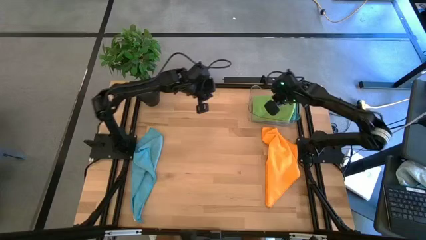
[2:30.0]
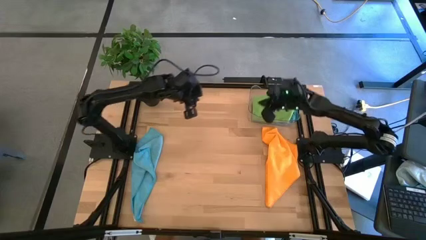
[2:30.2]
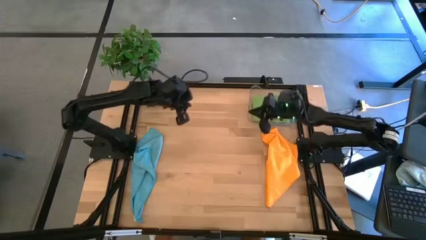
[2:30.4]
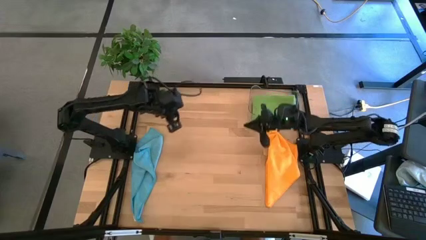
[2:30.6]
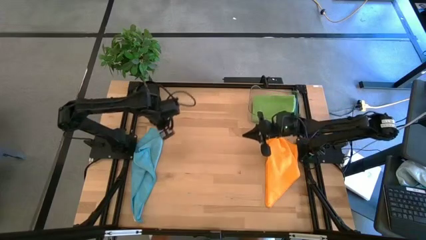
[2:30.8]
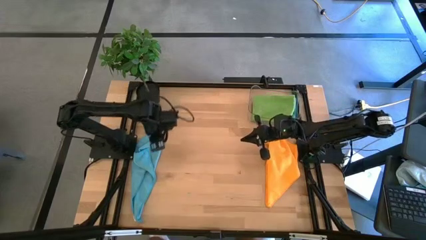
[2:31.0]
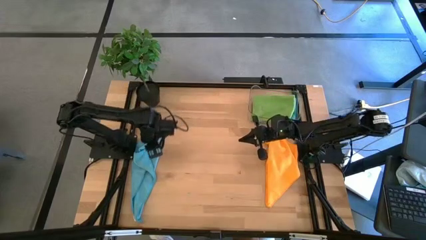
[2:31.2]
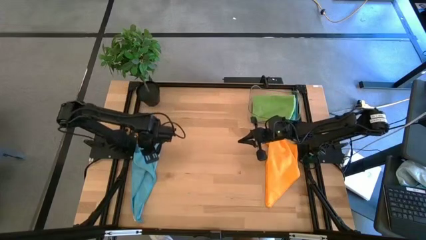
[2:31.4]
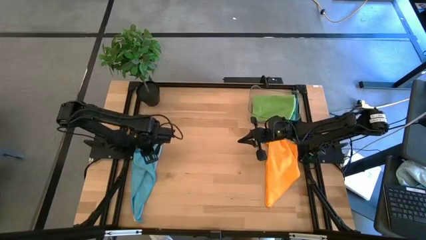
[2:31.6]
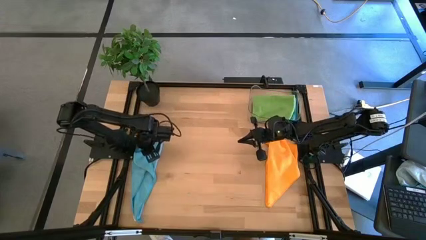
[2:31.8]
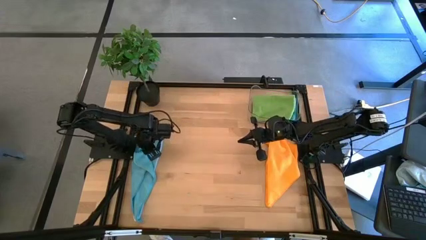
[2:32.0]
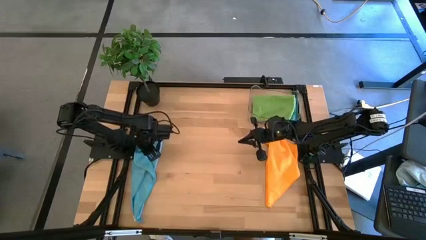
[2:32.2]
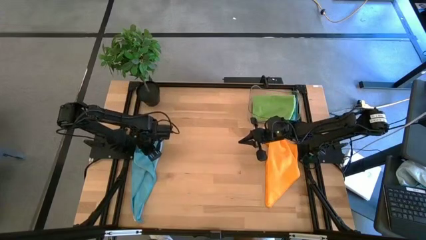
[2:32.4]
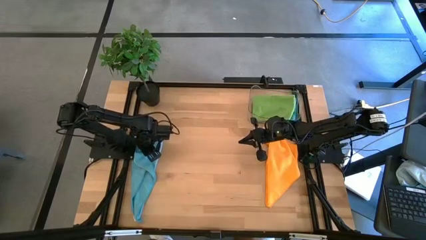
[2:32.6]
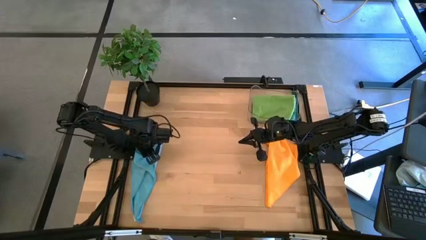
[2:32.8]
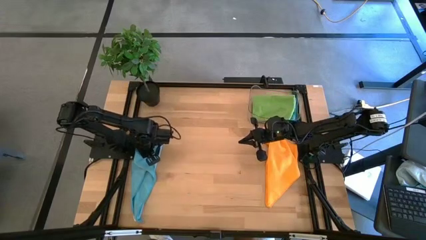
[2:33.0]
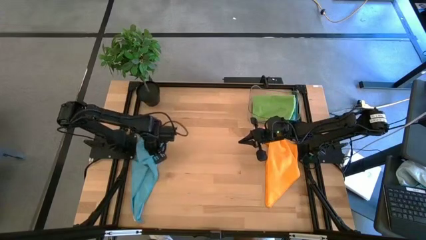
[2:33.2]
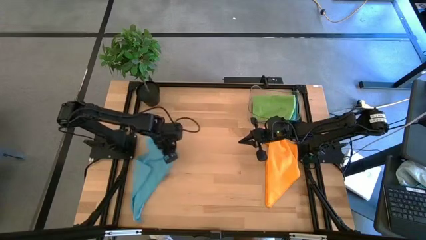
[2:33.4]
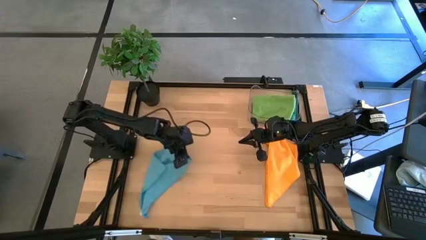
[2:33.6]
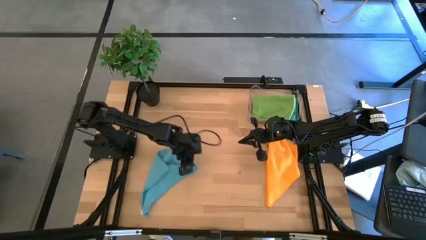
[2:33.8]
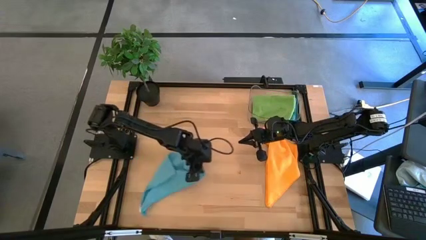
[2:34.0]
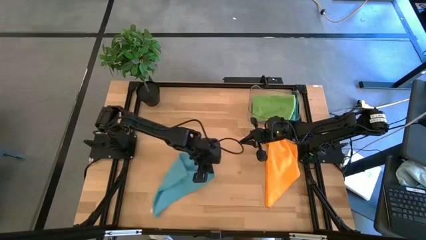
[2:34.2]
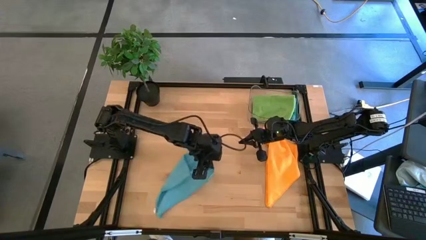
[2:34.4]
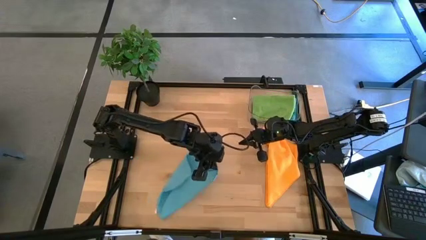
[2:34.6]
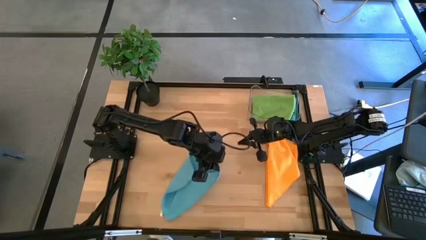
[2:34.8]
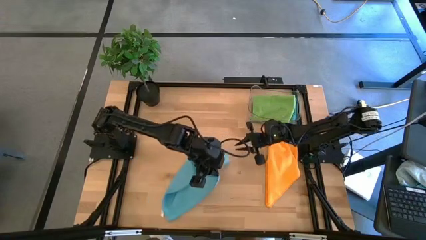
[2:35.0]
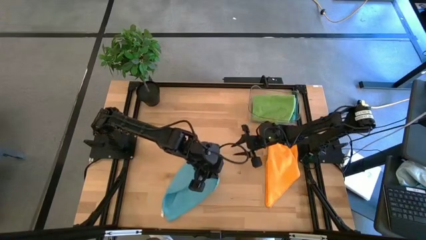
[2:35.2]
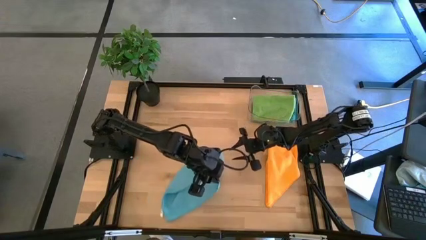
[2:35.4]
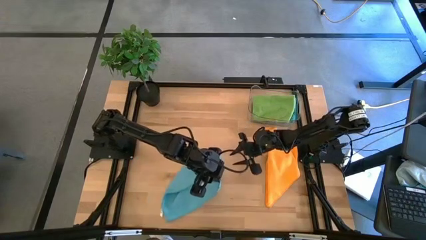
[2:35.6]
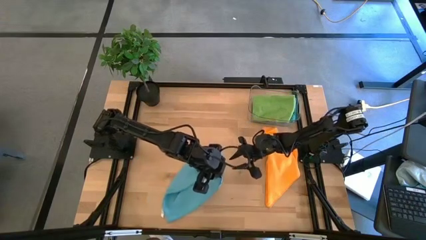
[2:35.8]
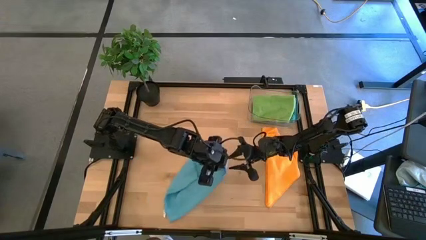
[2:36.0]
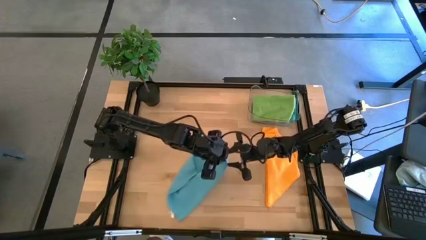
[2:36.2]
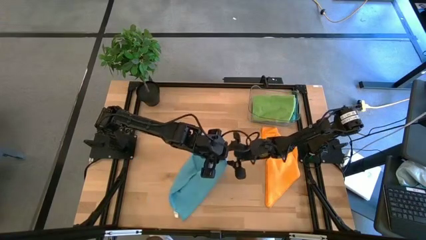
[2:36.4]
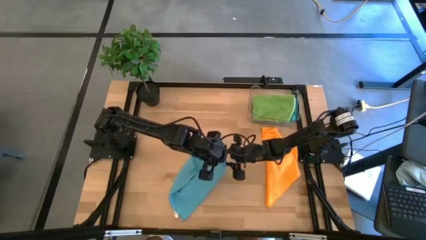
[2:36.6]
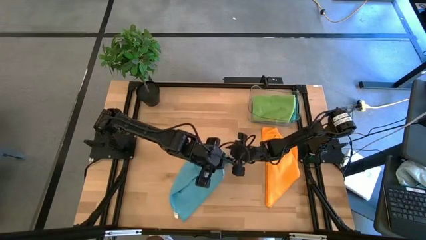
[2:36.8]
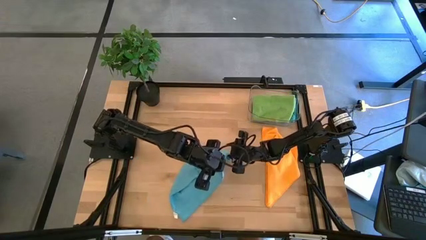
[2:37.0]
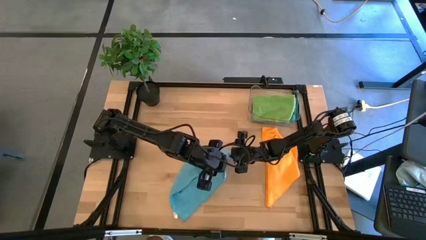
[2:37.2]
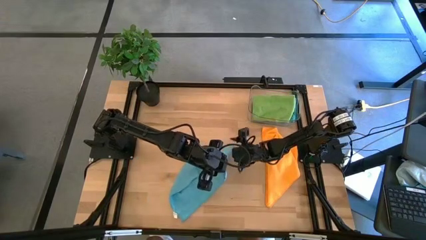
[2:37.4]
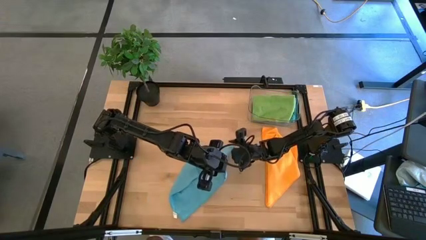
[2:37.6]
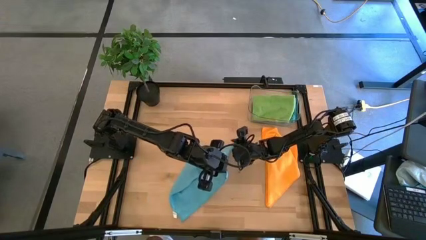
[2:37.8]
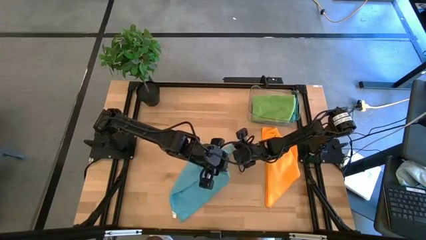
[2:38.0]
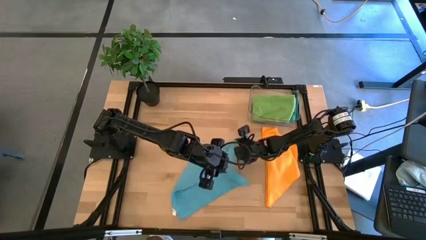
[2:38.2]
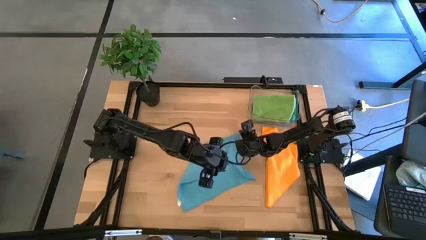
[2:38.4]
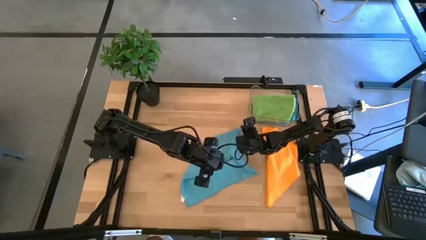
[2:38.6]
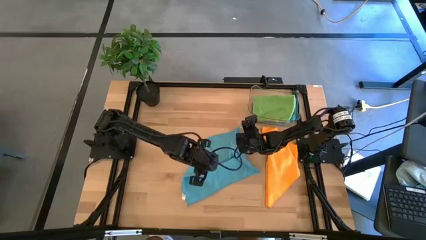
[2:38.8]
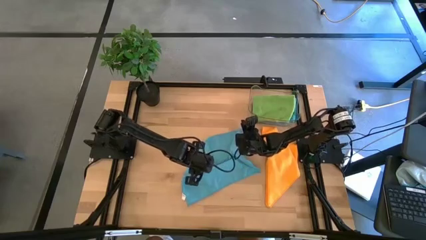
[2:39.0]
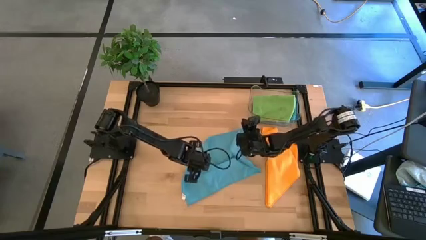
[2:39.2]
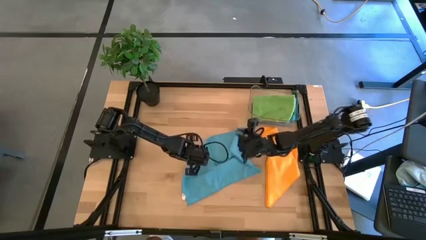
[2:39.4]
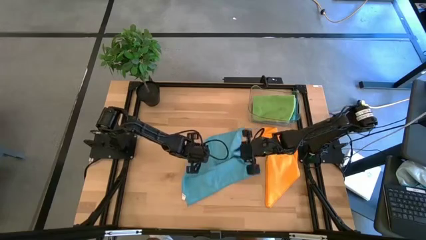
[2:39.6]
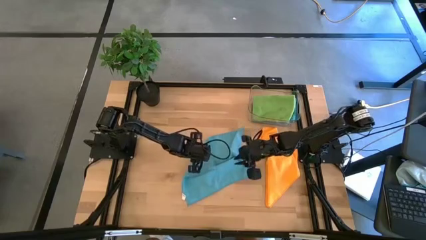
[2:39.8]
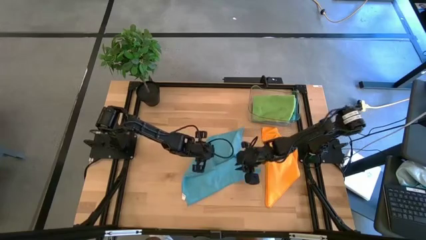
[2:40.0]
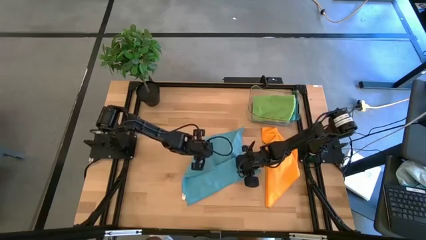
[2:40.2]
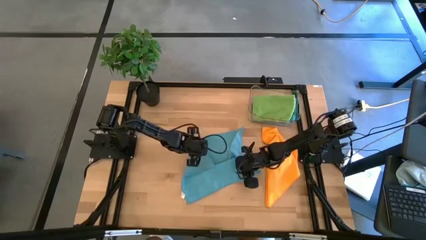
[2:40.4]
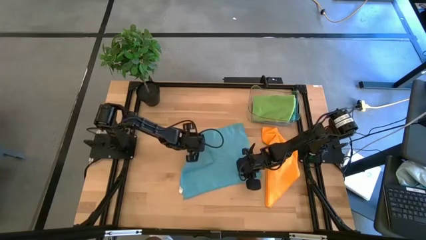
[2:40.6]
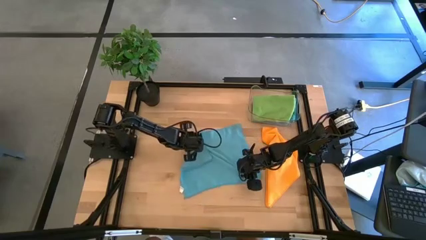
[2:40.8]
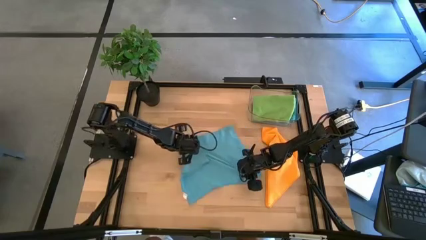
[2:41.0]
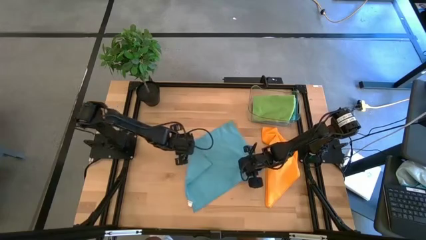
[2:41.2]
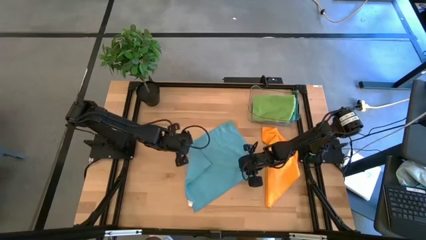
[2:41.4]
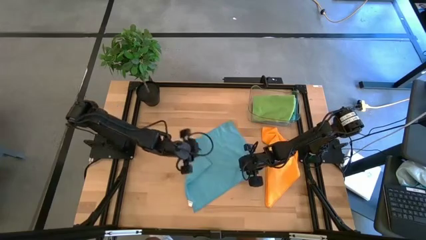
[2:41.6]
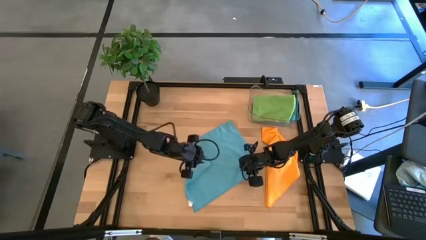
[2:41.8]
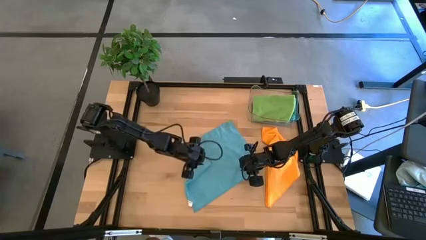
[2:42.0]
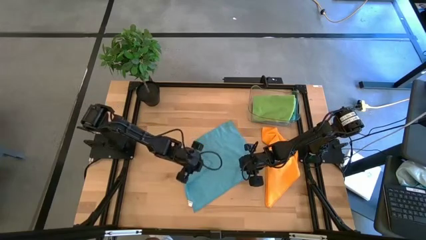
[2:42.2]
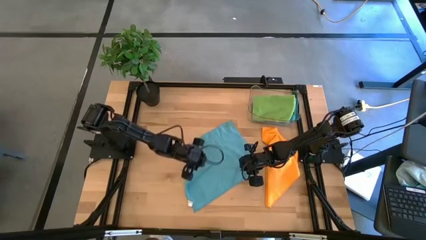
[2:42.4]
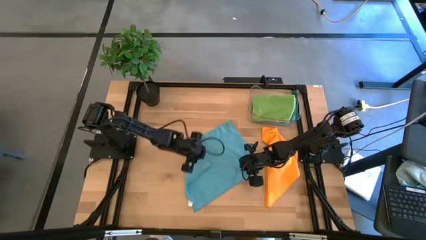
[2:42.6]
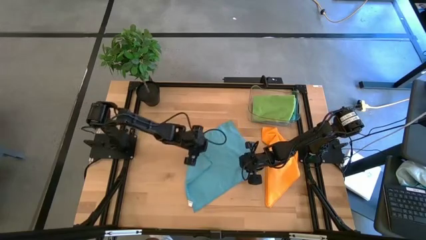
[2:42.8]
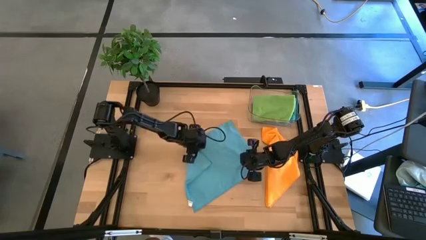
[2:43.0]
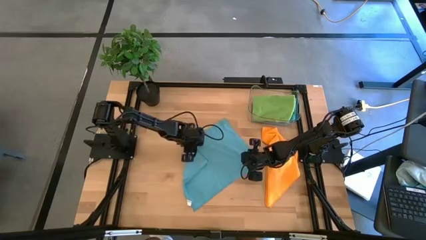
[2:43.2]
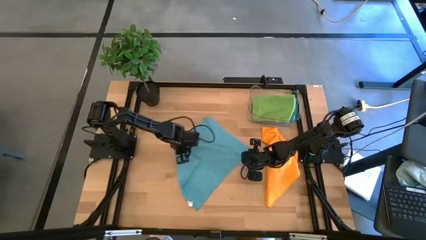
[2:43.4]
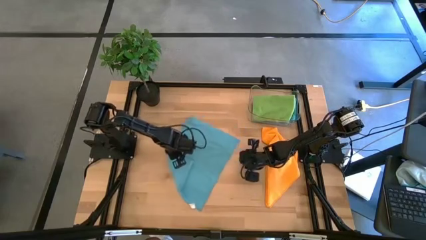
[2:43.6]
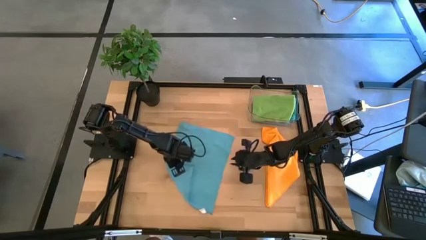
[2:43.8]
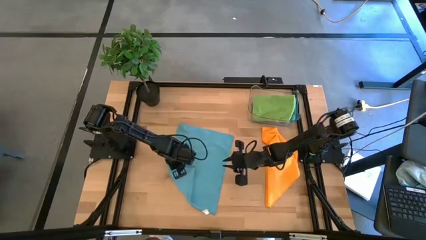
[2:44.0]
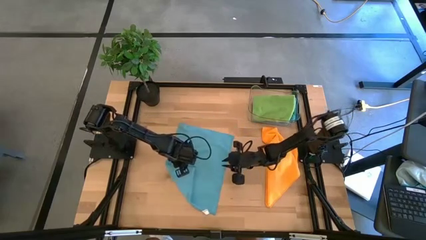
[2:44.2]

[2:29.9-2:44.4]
Task: Fold microfiber towels
Fold the light blue microfiber towel

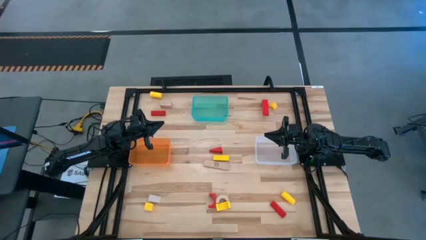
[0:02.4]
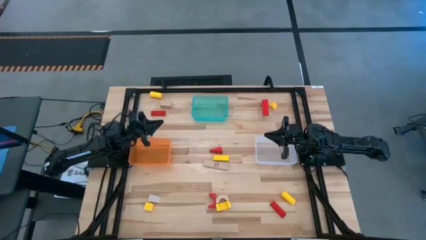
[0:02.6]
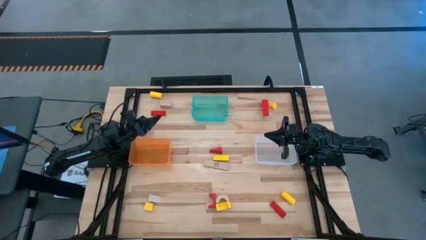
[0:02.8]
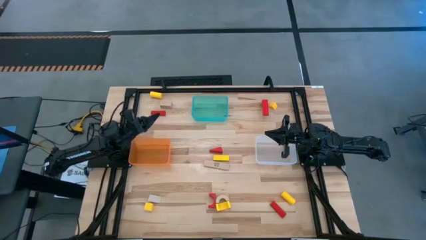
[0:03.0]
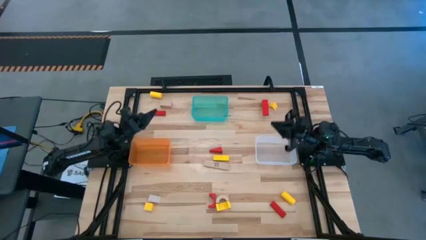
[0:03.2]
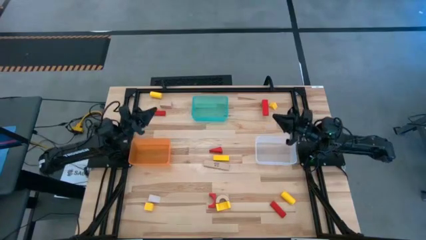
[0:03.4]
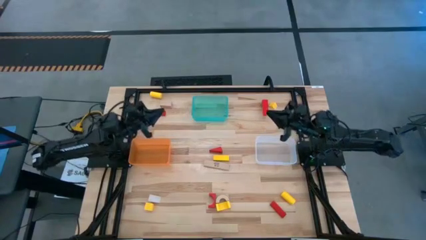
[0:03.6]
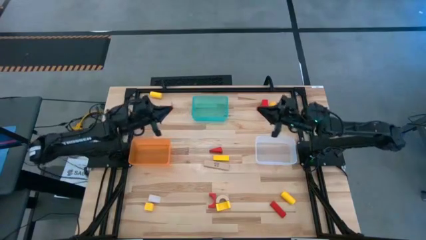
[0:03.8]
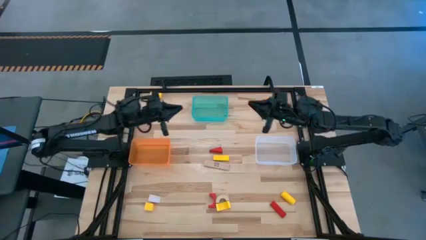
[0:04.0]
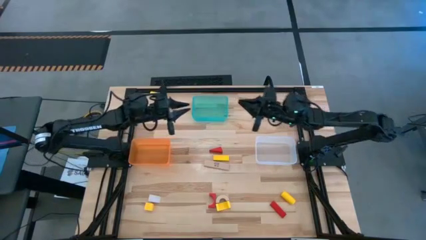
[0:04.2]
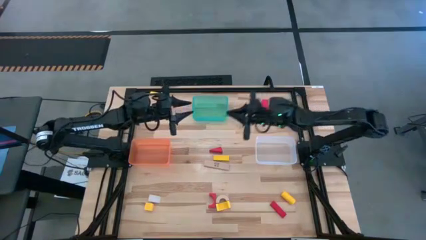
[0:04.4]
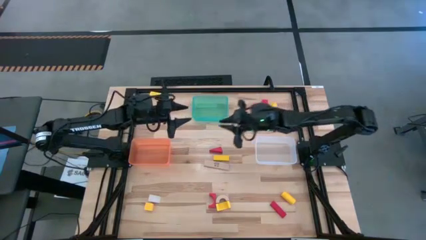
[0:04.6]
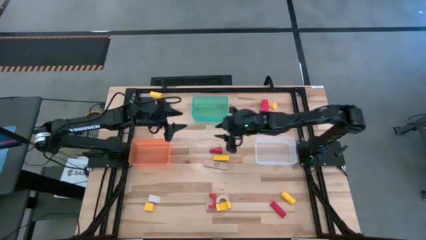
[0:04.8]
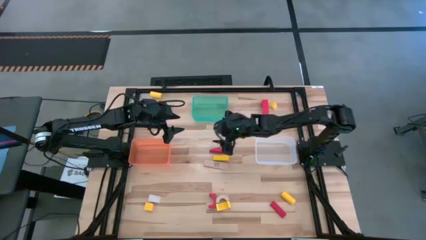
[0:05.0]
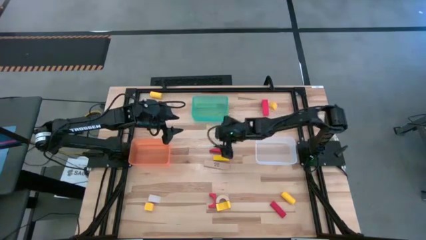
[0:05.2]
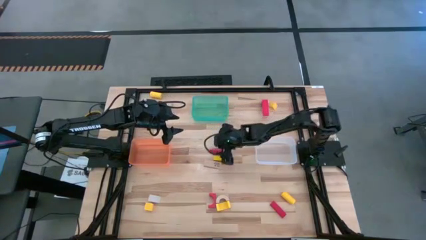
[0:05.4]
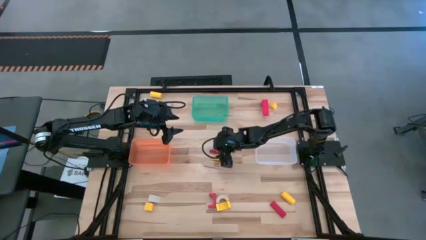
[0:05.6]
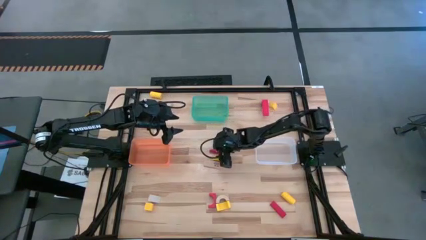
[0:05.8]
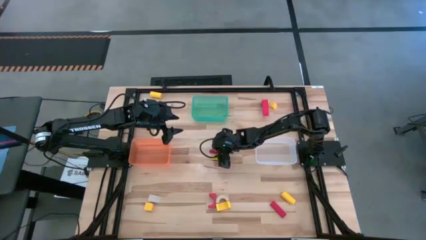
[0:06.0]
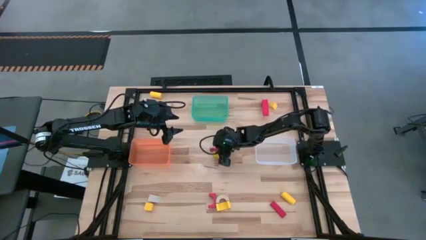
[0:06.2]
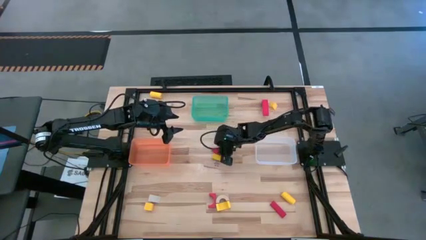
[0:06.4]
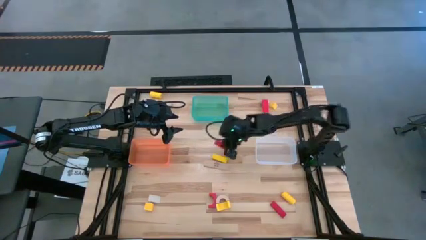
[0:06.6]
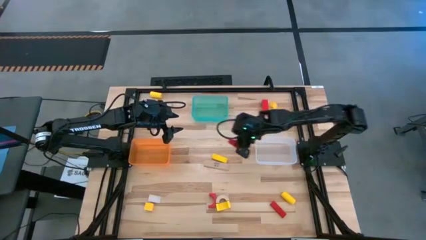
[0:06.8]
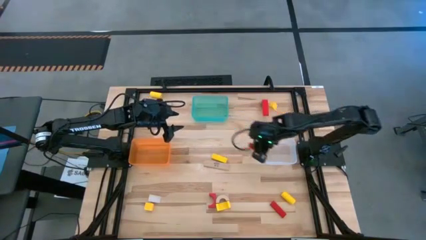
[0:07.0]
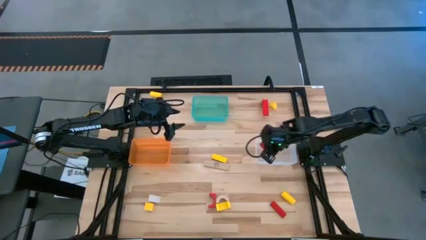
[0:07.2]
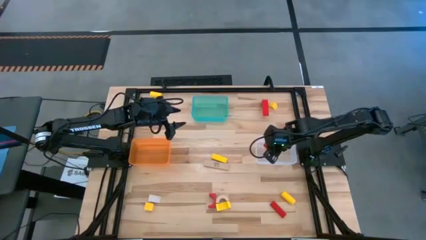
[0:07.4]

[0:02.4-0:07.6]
Task: Sort & place blocks by color
Put the red block into the white bin
